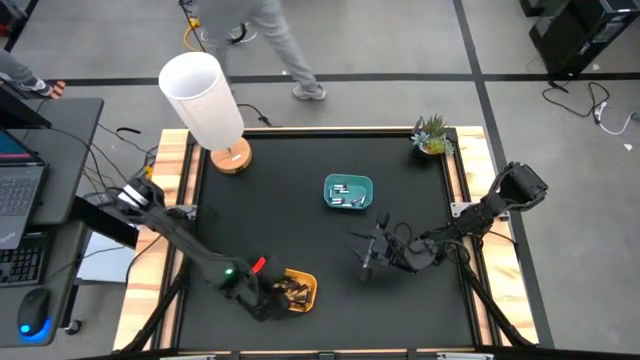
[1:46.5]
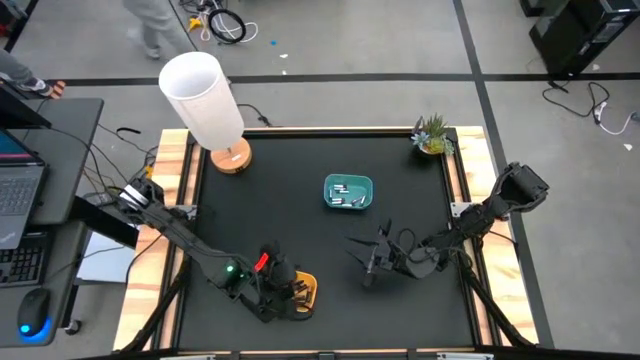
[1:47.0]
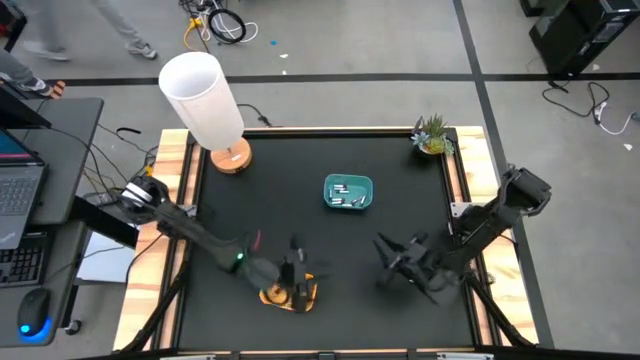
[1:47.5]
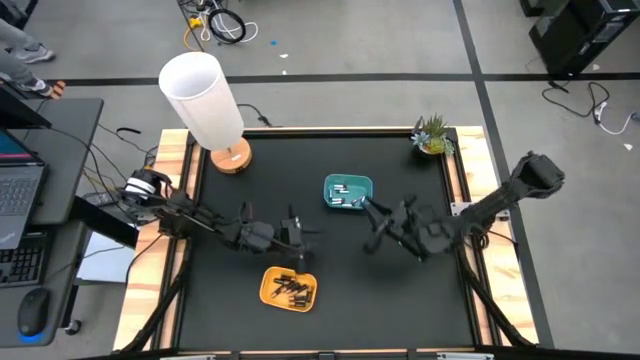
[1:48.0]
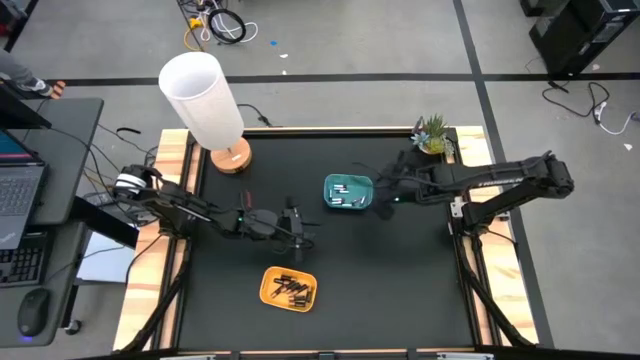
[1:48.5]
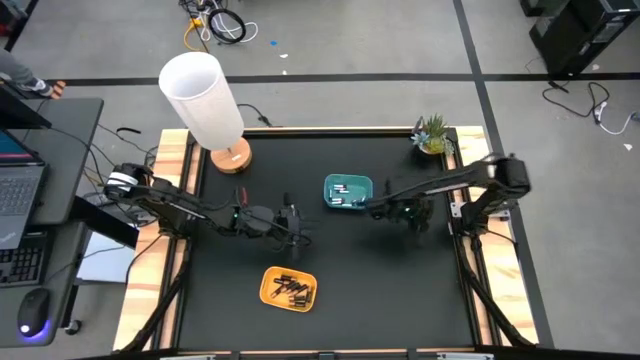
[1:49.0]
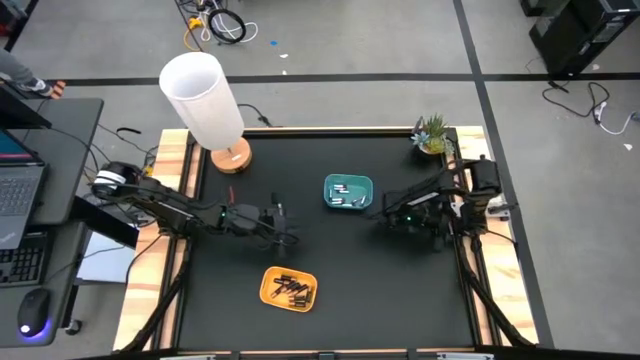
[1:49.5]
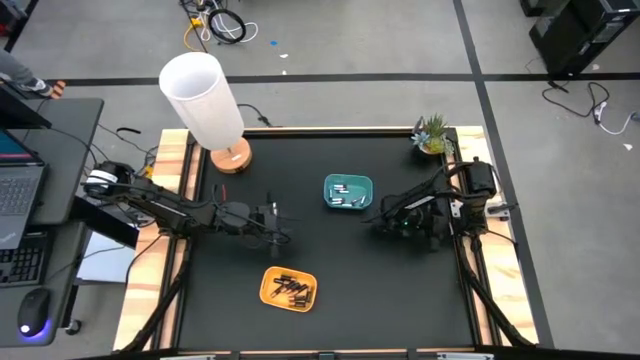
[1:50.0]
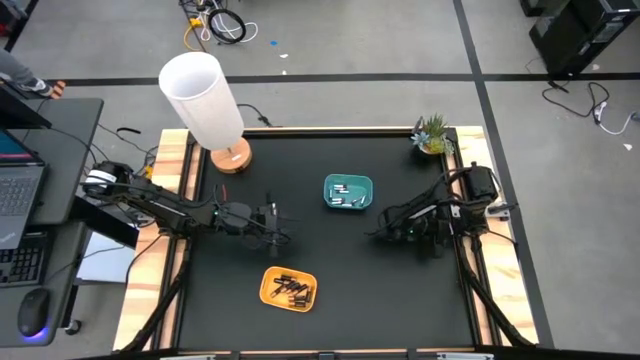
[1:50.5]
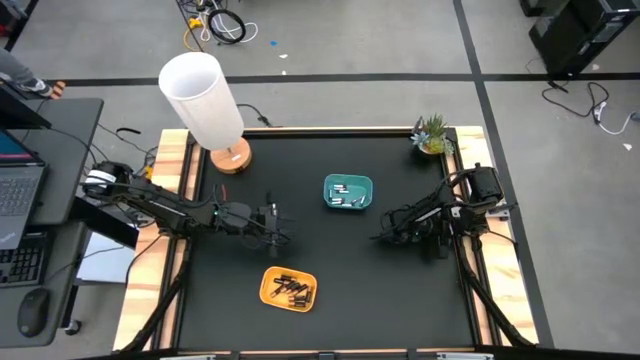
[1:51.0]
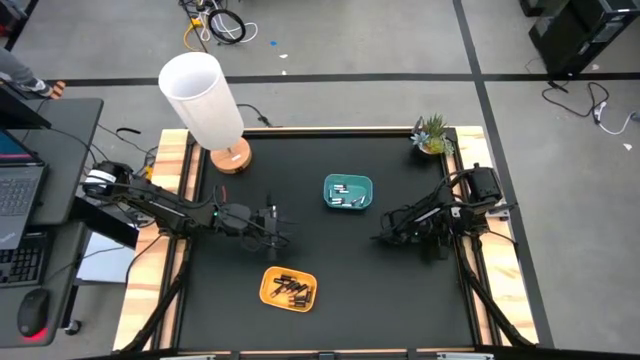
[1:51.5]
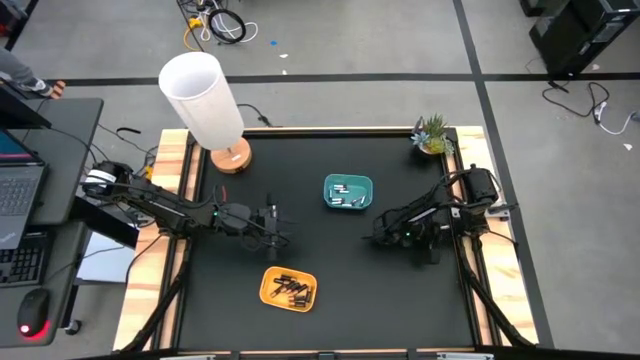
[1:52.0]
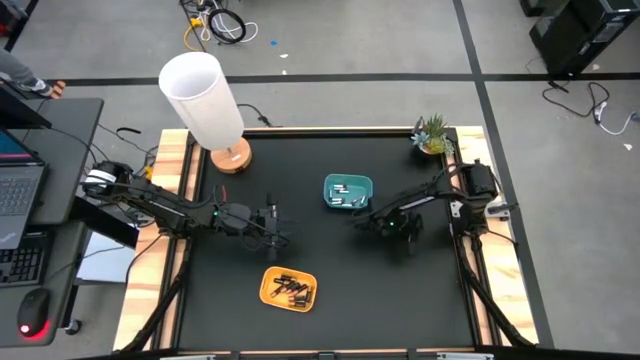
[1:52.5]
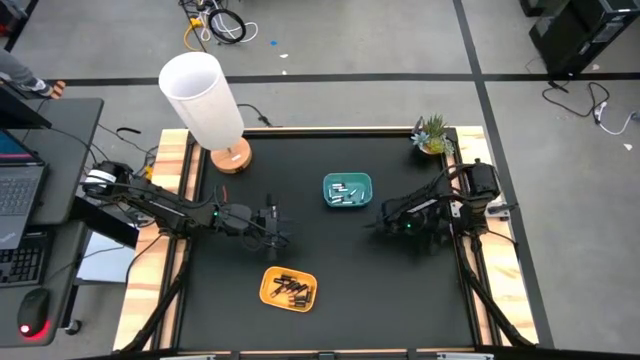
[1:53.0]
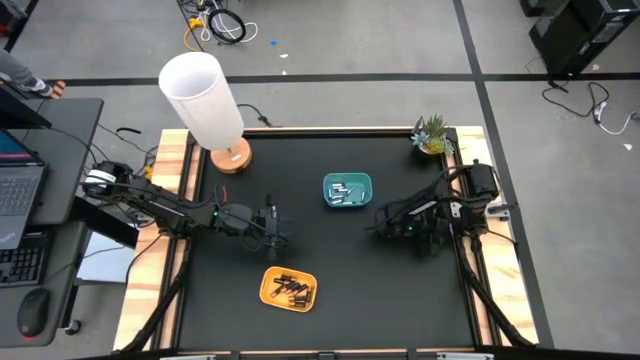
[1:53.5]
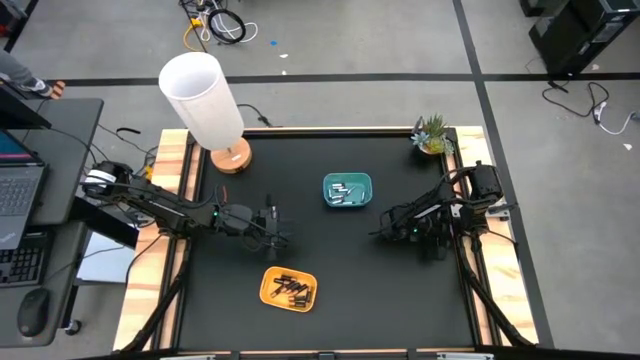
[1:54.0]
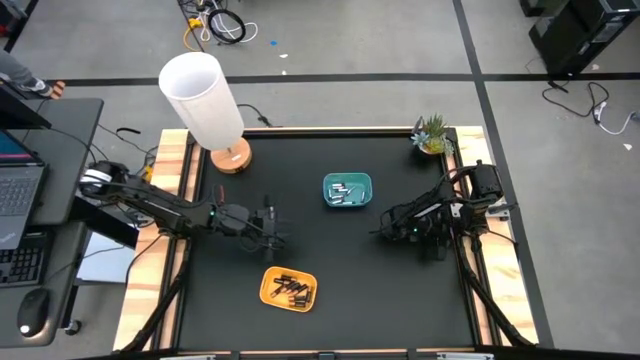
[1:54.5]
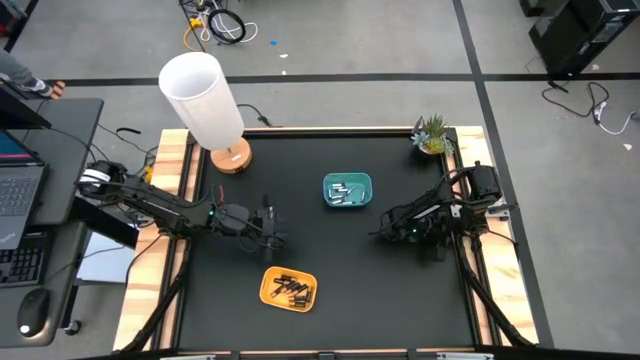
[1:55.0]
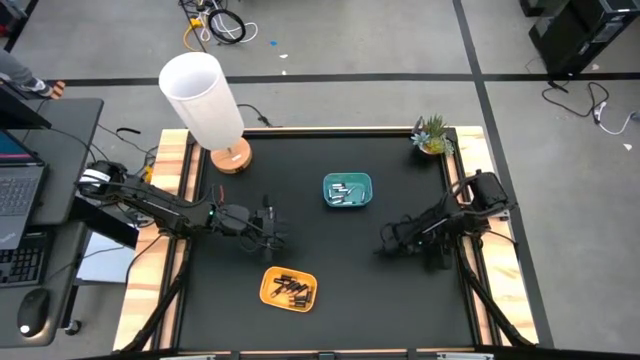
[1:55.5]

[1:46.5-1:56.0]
Task: Sort batteries
Put the silver battery into the blue bin

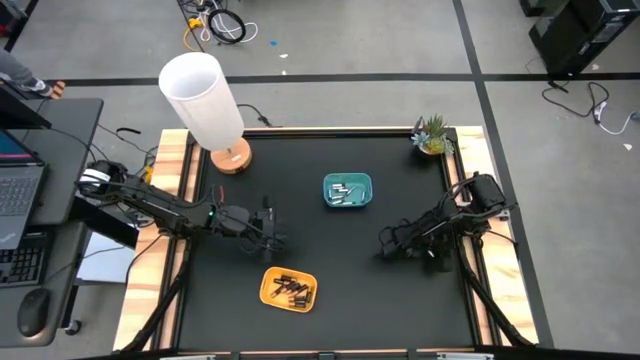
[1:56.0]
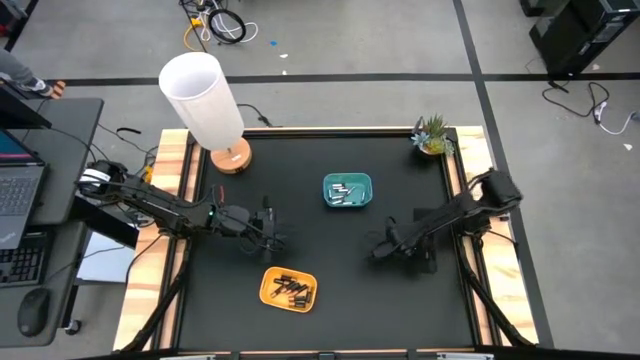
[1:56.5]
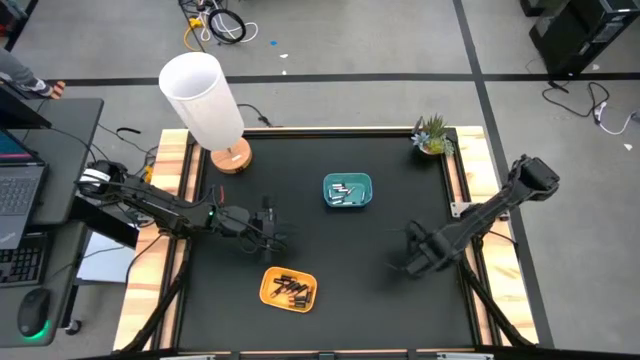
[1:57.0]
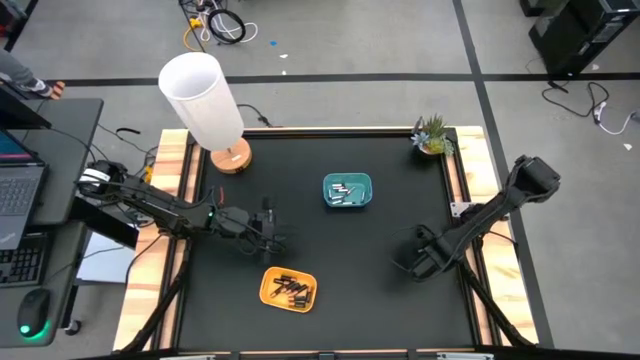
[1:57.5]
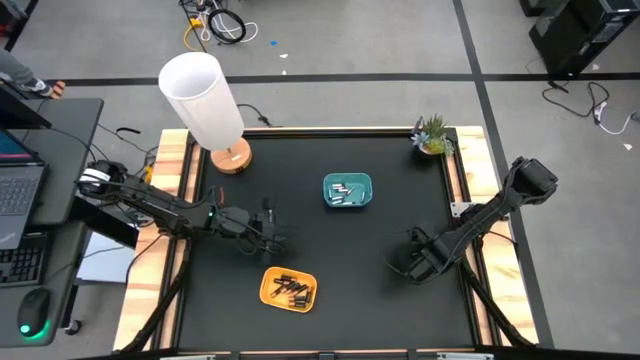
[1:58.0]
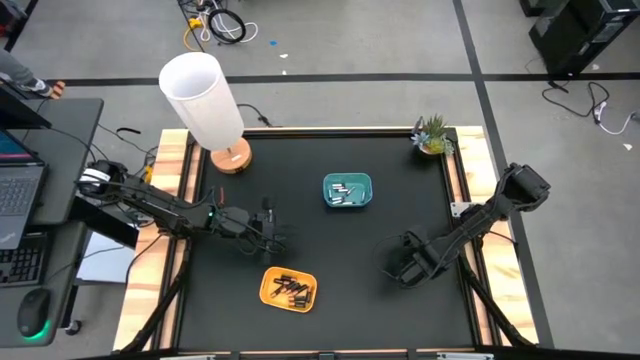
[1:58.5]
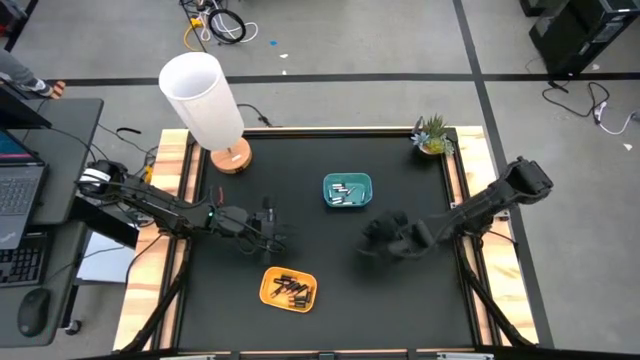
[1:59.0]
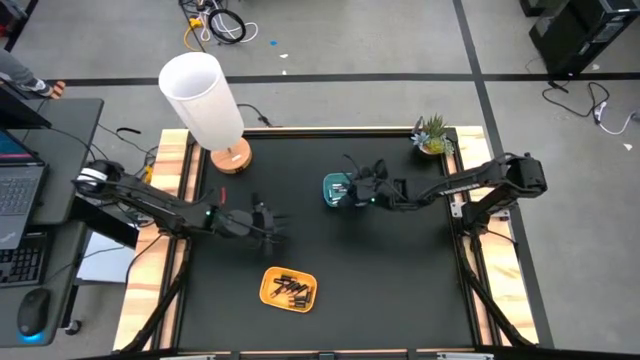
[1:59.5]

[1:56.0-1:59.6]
Put the silver battery into the blue bin

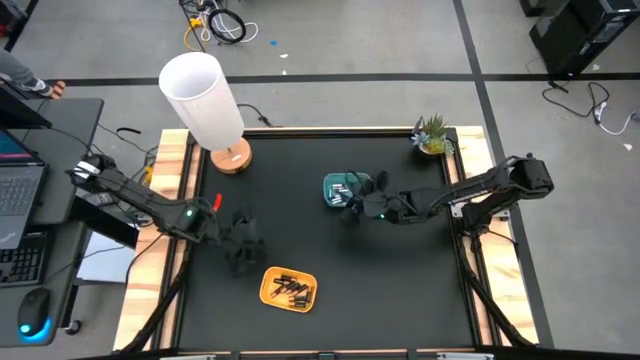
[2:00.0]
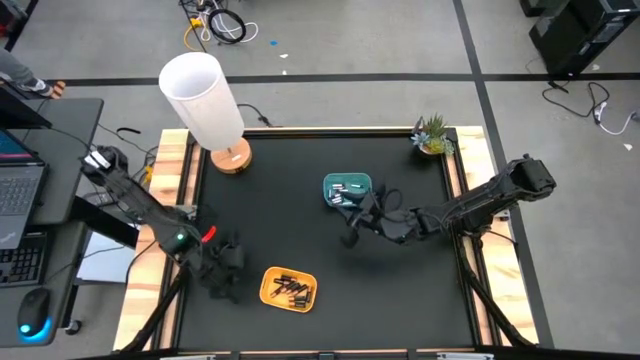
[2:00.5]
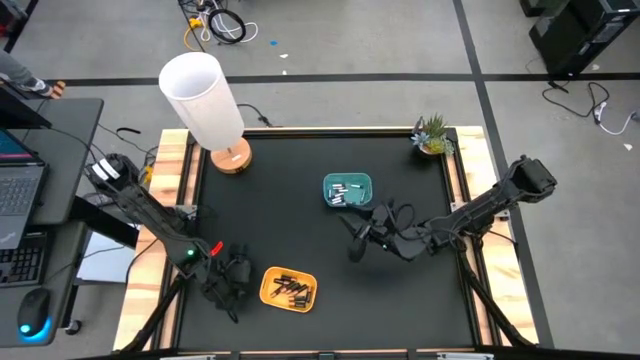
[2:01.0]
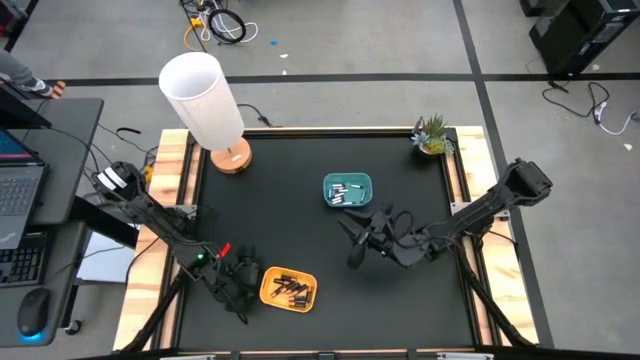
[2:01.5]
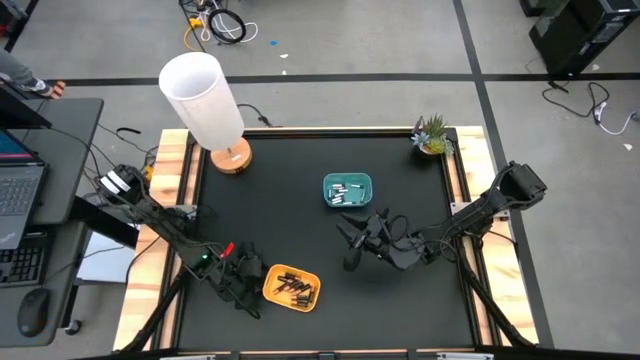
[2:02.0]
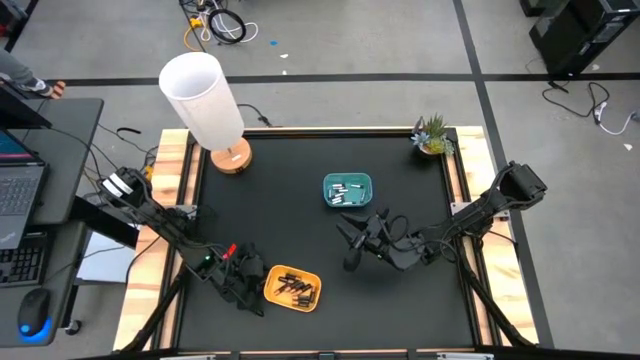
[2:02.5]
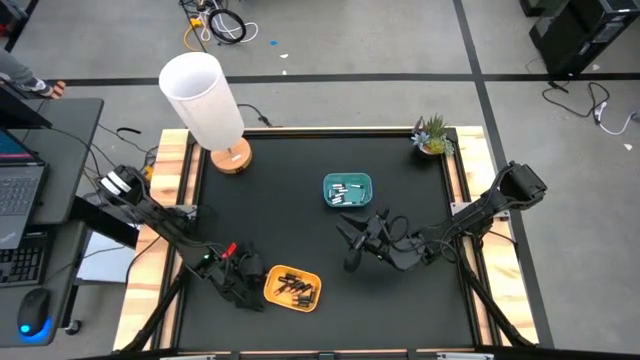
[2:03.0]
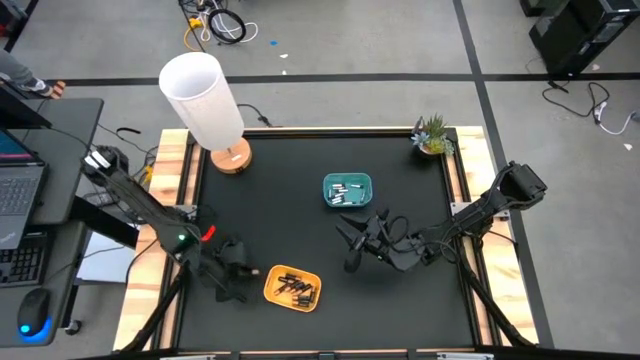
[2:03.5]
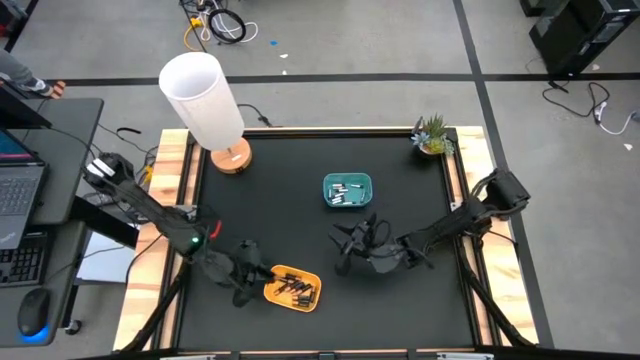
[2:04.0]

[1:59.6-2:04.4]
Put the black battery into the yellow bin

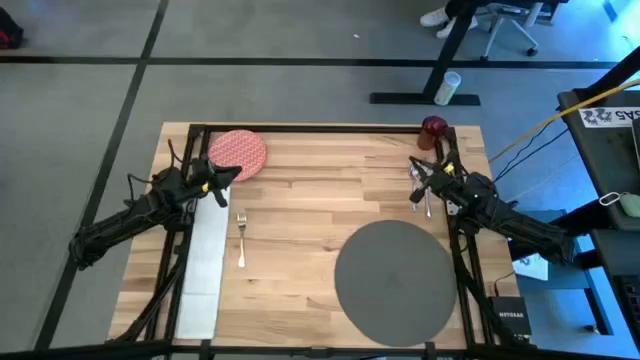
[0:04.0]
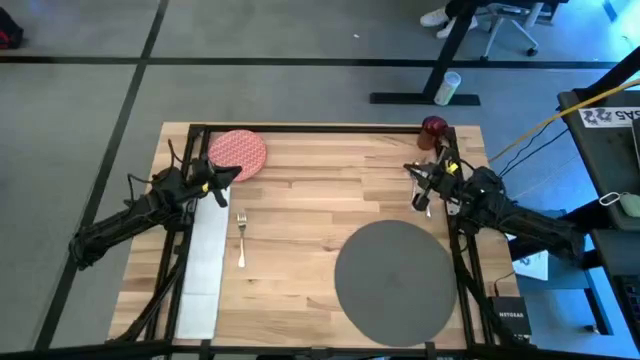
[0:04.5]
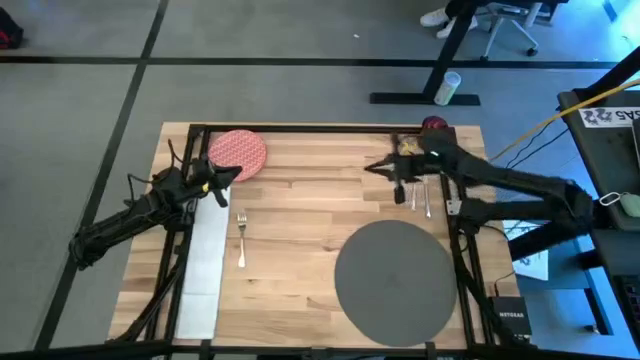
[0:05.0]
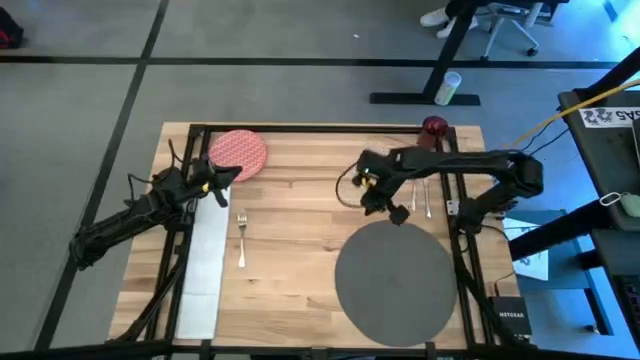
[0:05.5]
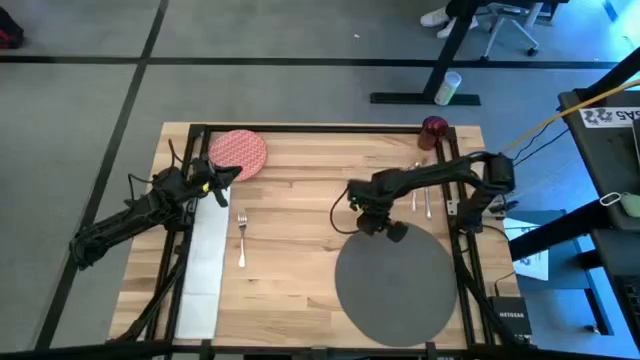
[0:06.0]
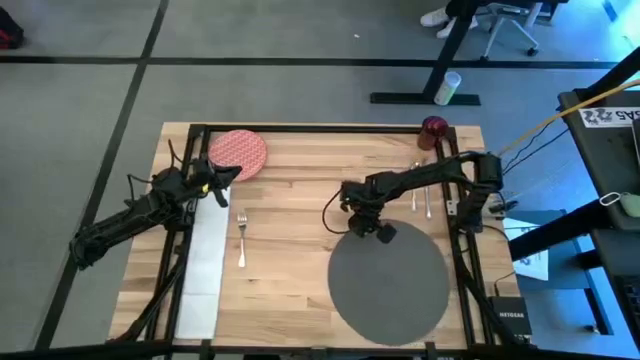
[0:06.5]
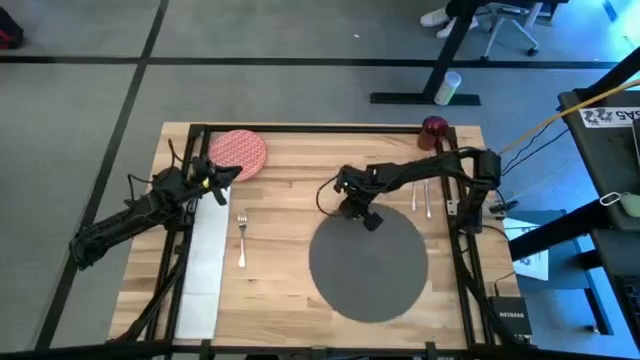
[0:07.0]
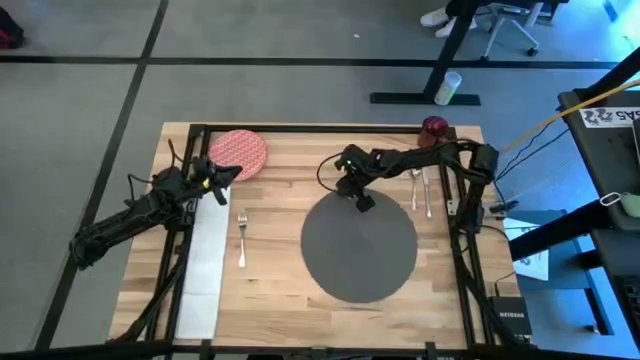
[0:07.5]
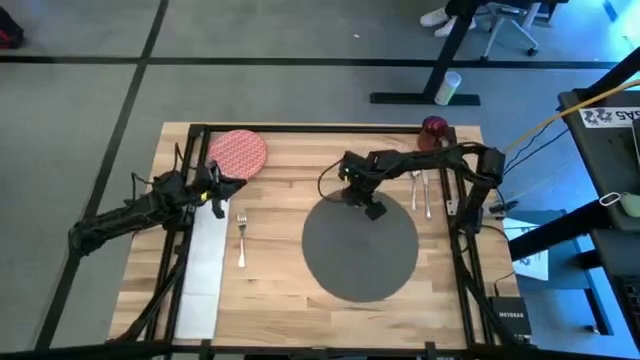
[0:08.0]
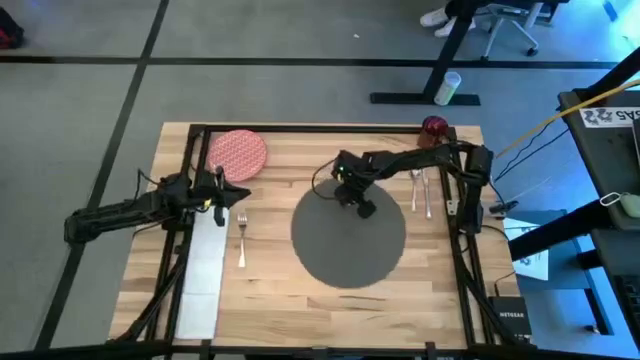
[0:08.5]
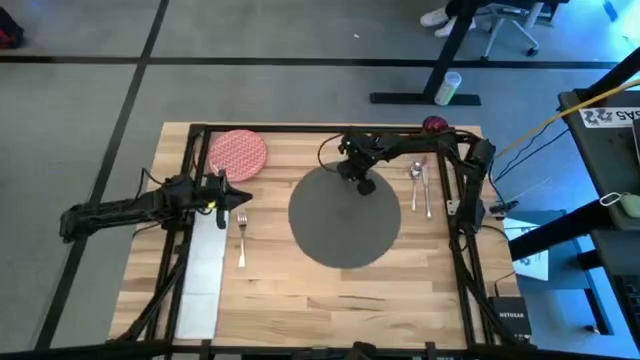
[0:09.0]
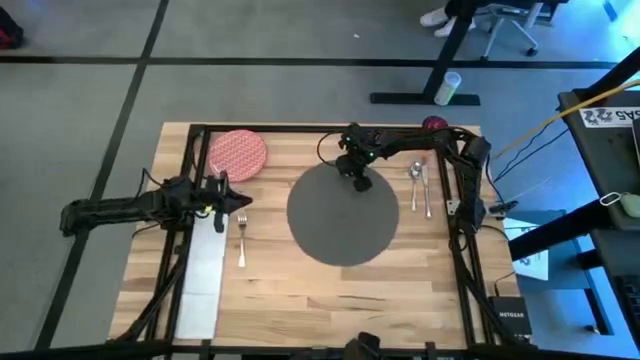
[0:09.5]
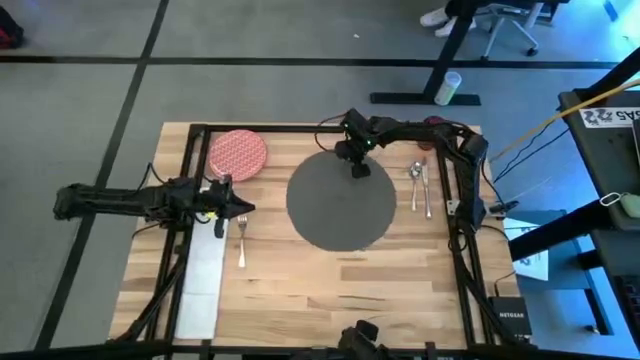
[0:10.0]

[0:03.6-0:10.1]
Task: Set table place
Move the gray placemat from bottom right to center
